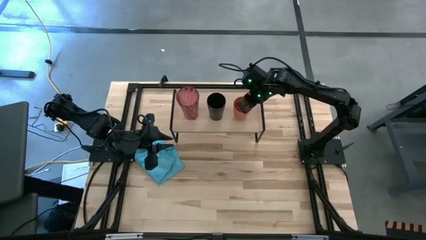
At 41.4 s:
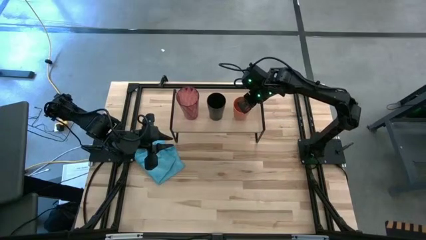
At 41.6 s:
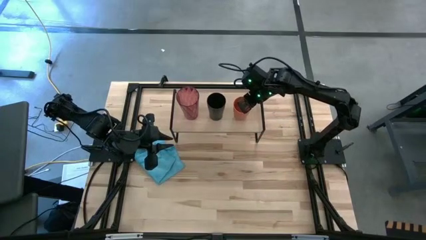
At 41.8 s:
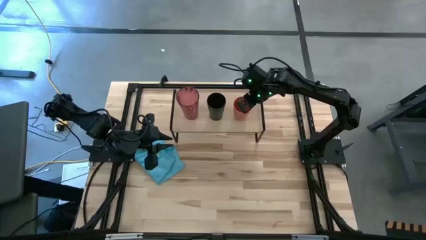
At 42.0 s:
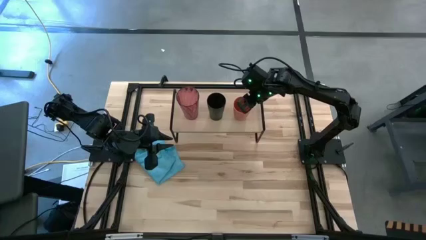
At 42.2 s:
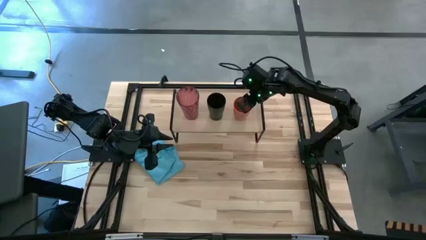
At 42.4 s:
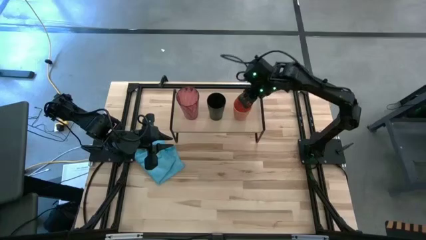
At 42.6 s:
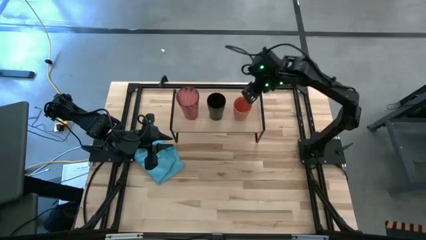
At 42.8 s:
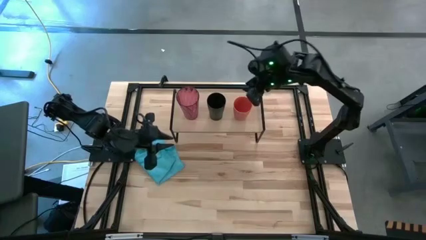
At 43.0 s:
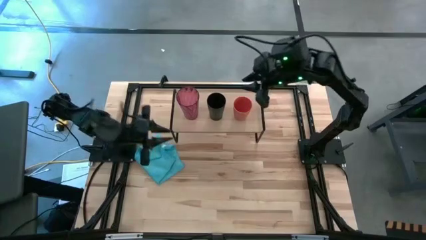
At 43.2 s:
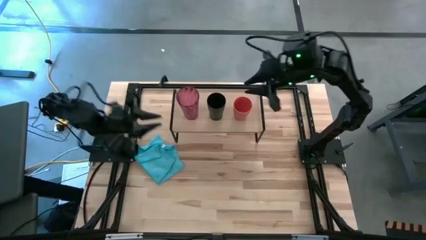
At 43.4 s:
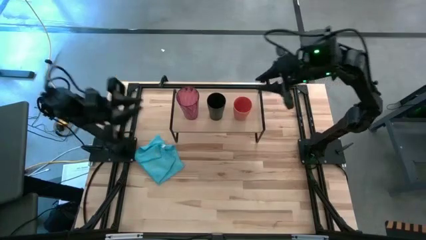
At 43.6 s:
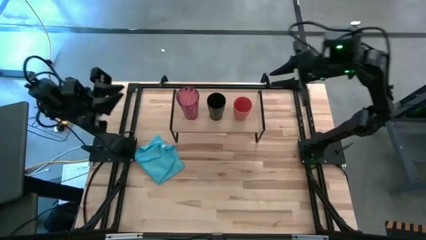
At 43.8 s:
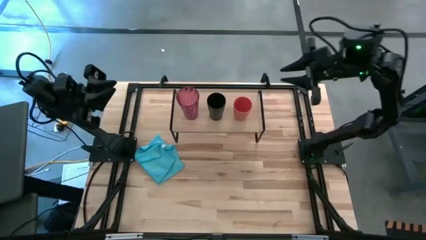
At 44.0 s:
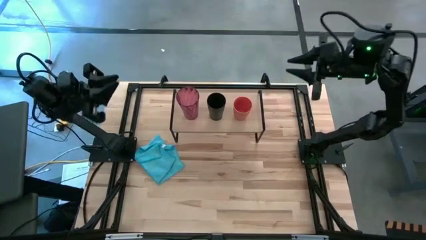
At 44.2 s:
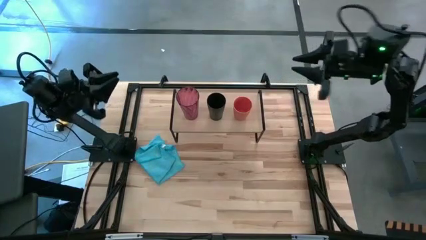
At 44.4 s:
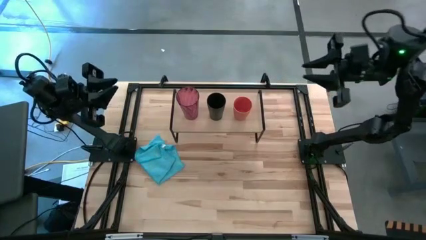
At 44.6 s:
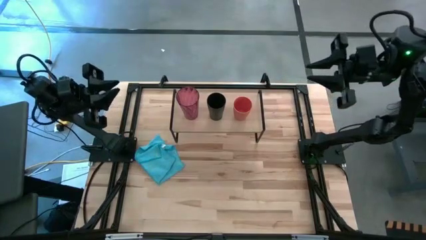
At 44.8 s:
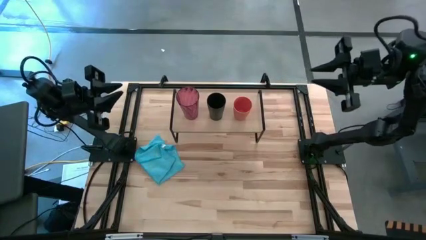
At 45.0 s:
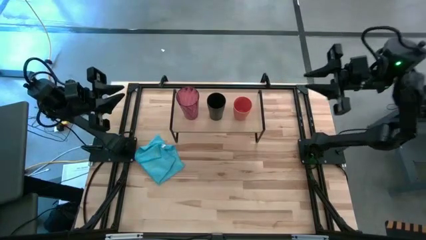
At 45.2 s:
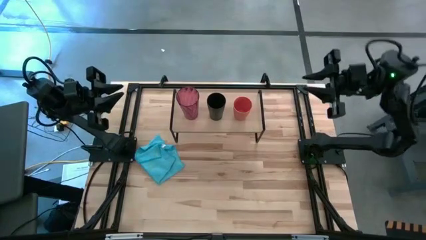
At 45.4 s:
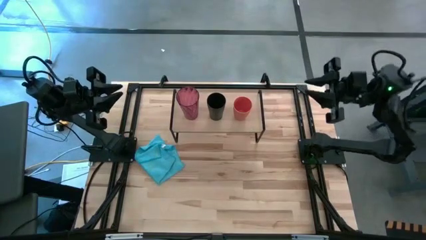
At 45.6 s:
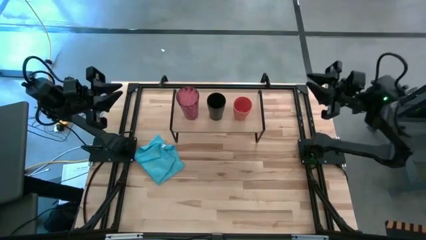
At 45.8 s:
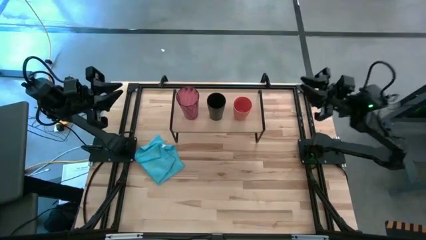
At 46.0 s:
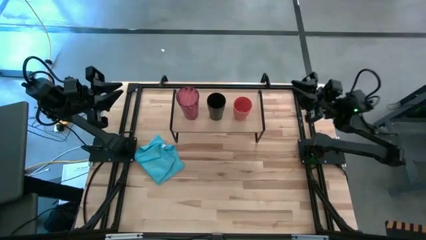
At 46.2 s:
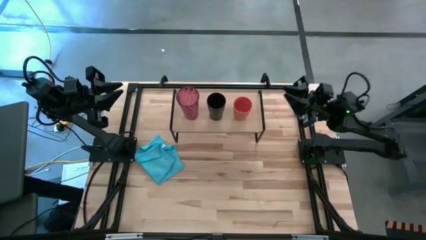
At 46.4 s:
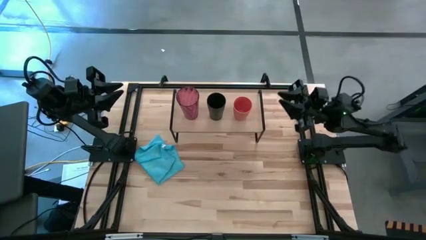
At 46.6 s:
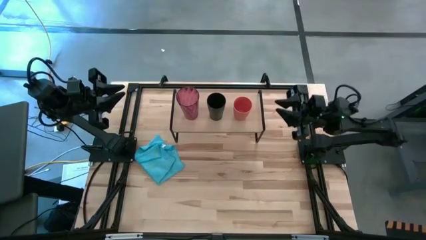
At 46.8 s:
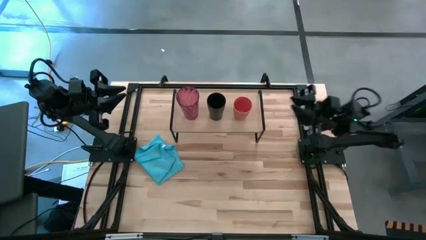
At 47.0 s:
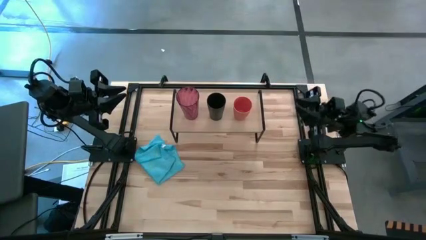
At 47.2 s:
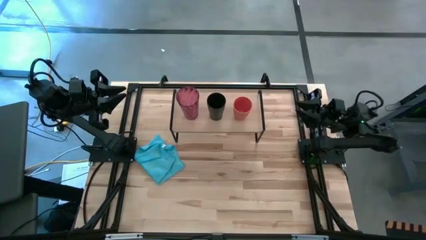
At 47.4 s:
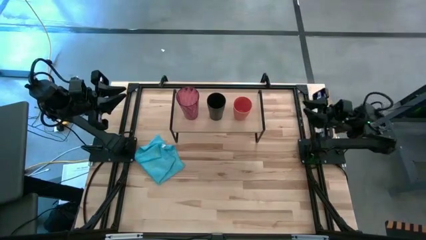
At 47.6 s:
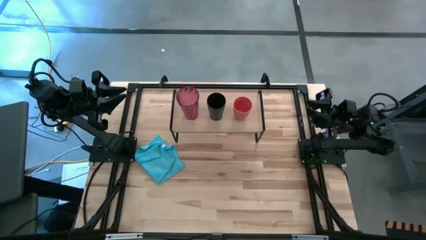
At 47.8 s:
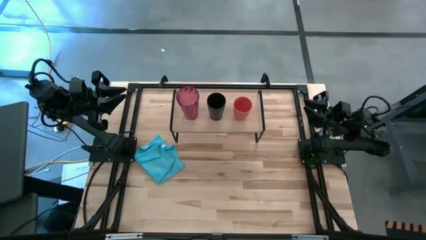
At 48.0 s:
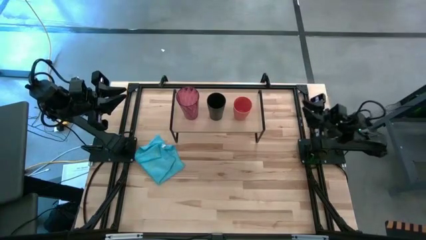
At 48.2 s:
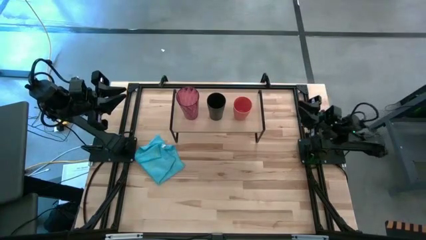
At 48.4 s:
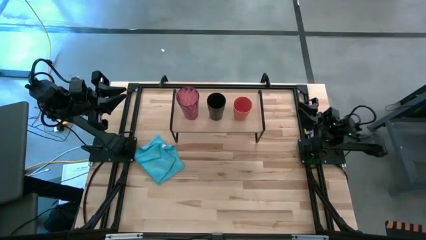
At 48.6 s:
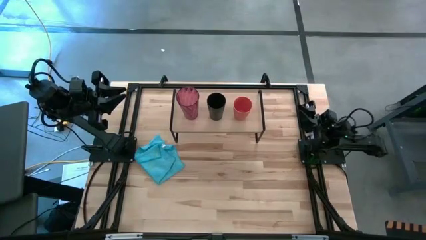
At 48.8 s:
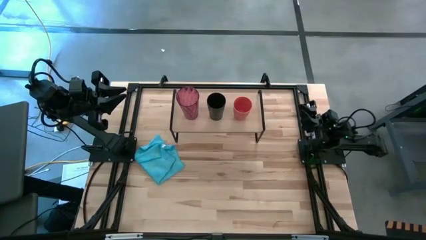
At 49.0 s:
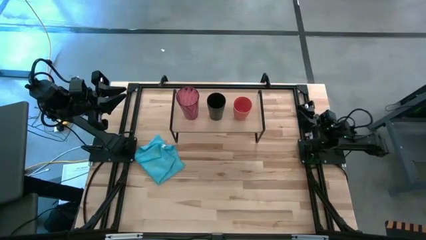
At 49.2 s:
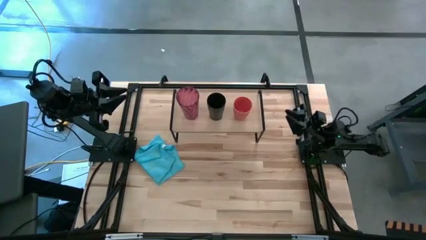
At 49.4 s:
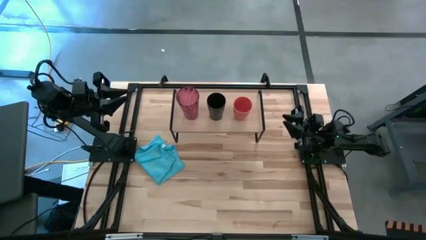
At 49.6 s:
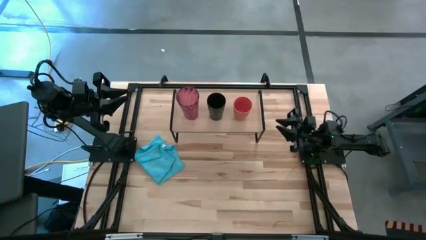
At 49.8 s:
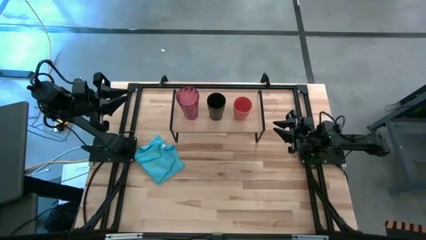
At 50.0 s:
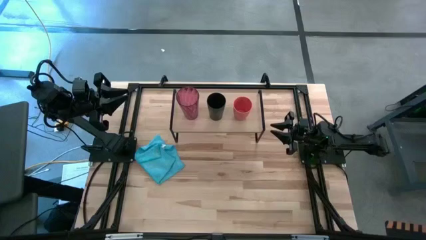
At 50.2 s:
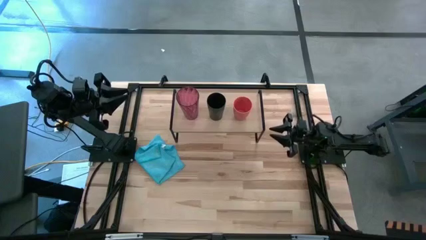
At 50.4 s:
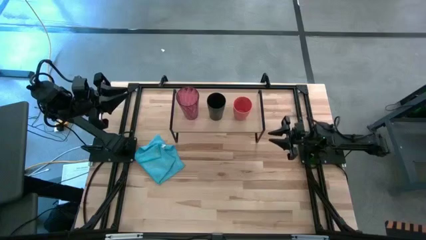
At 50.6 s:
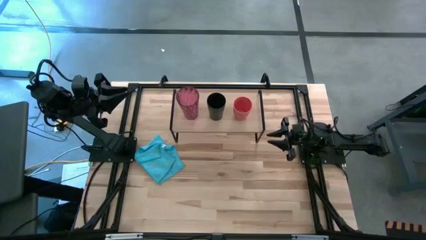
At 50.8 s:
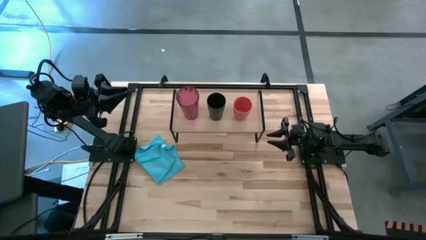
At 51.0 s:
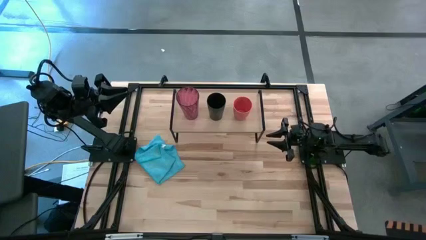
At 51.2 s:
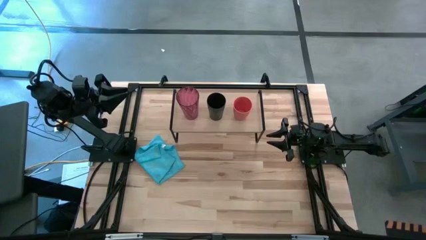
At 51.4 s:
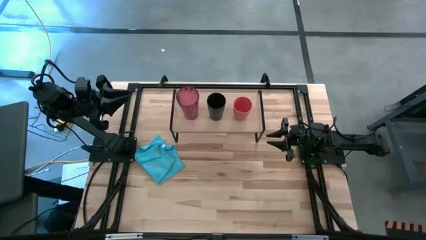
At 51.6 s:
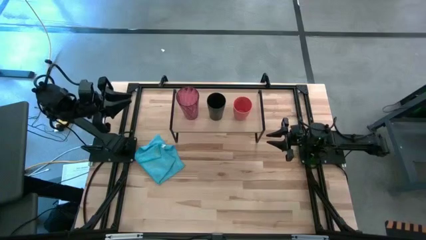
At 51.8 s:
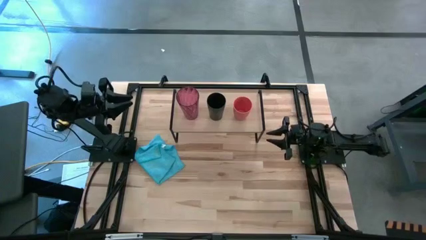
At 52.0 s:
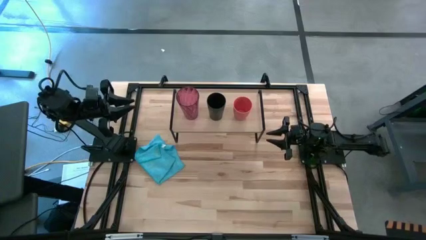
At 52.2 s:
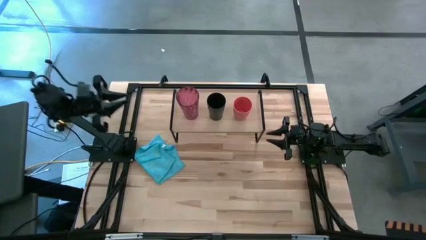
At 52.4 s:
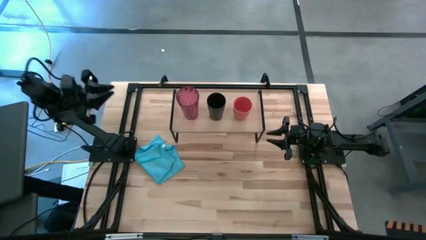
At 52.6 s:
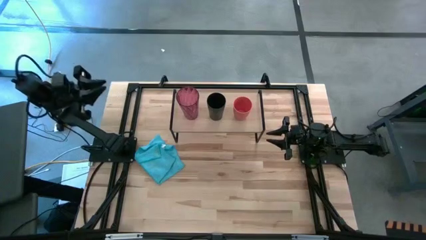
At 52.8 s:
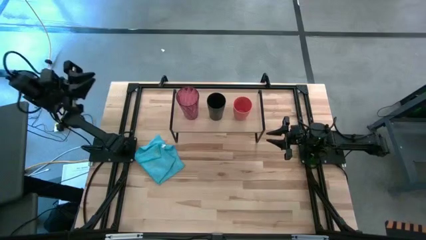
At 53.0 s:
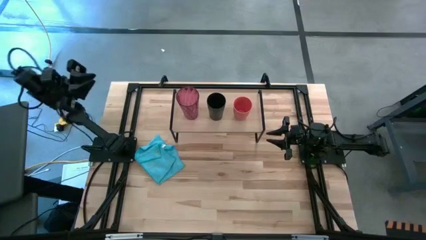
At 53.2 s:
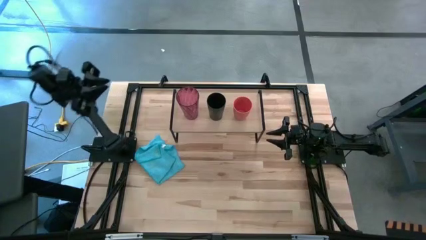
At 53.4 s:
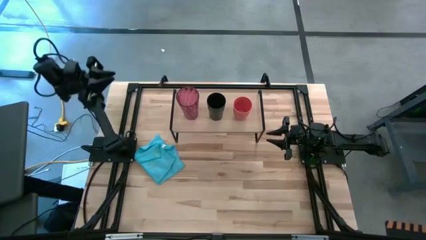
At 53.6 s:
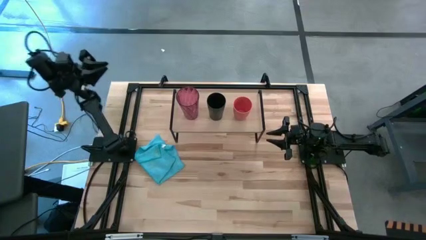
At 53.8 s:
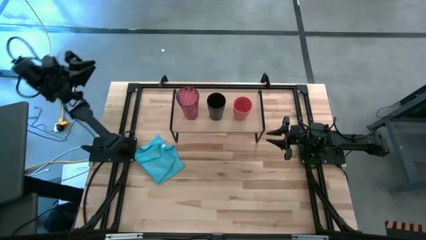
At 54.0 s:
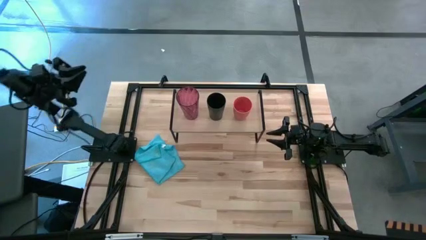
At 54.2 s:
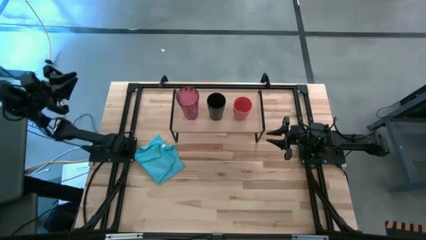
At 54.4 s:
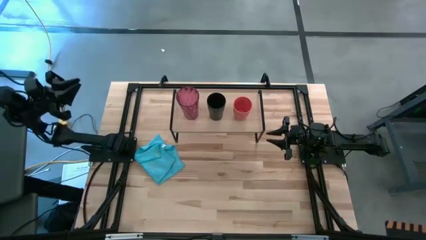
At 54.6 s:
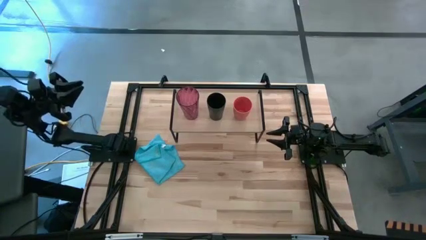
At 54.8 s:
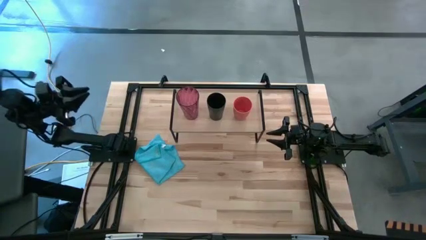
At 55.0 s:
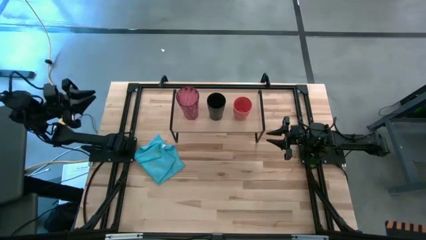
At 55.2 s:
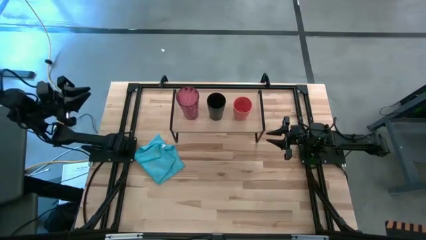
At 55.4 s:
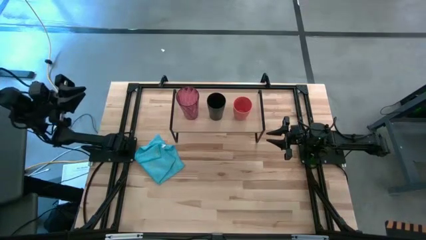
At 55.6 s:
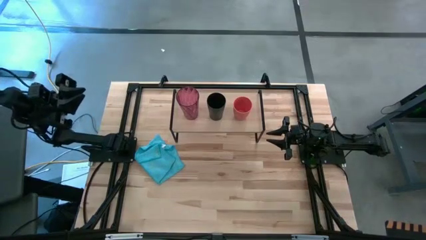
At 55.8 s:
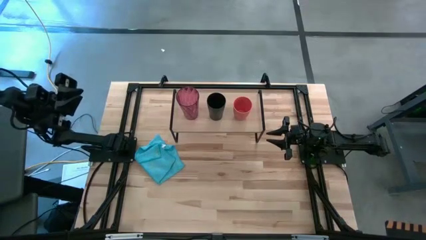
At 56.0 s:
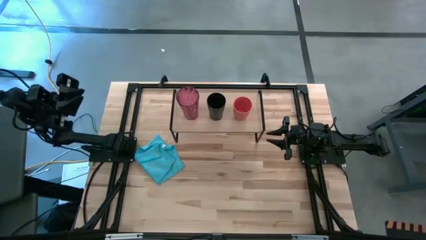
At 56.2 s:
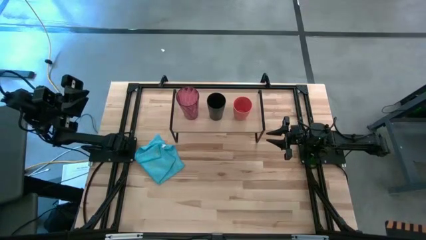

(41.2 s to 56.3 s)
Task: Stack small to large cups/mugs on shelf
Return to Home Position
